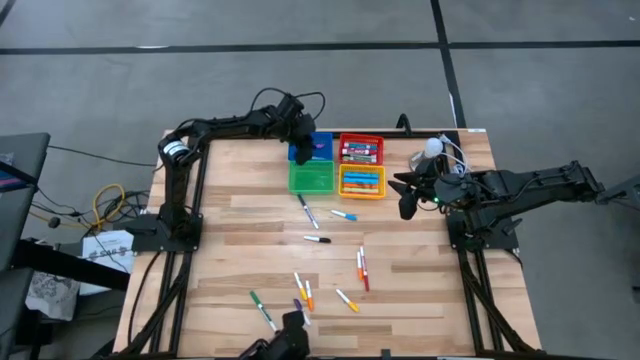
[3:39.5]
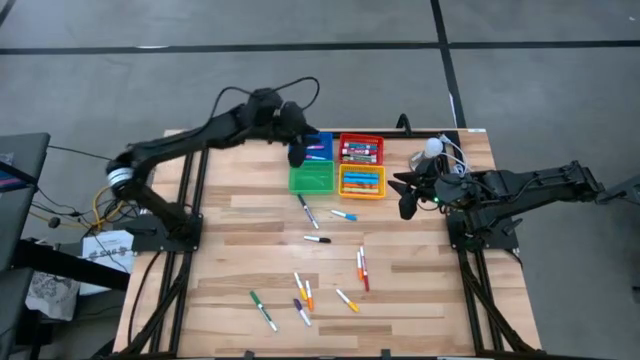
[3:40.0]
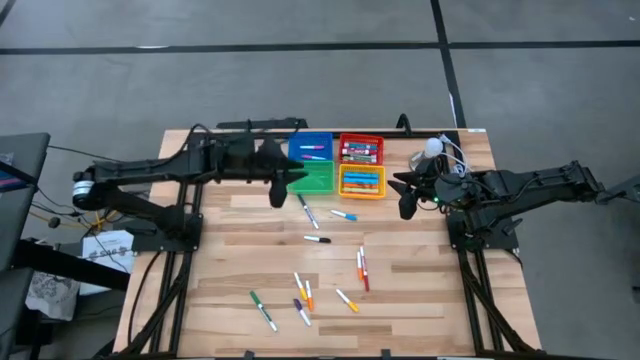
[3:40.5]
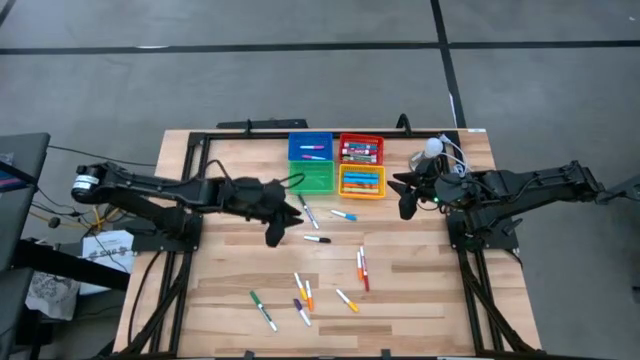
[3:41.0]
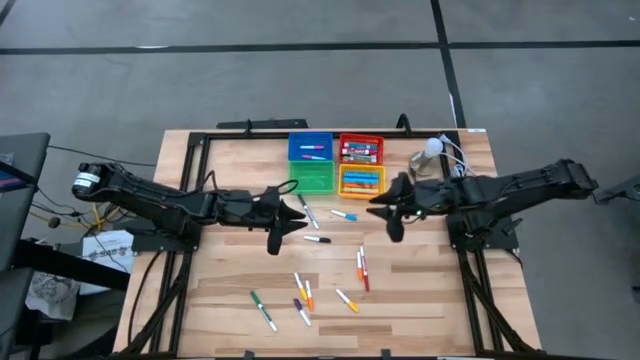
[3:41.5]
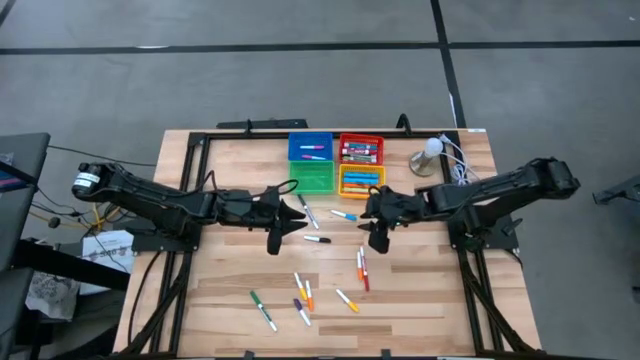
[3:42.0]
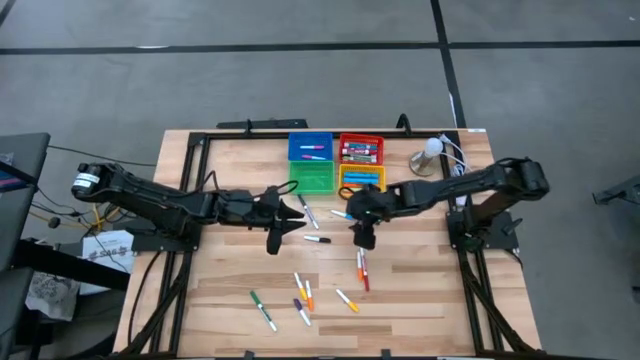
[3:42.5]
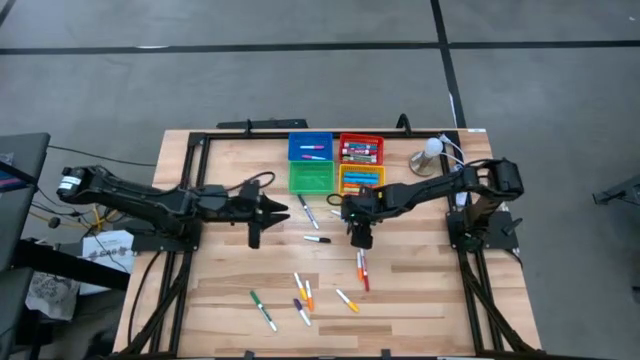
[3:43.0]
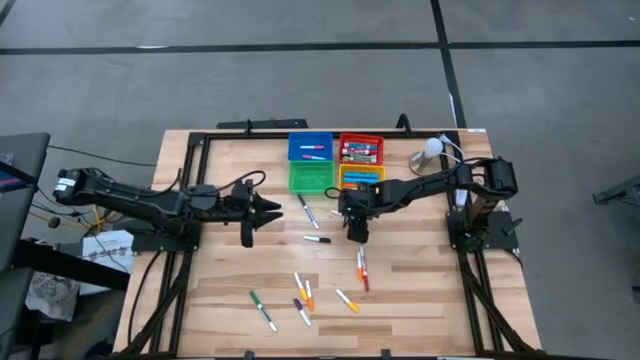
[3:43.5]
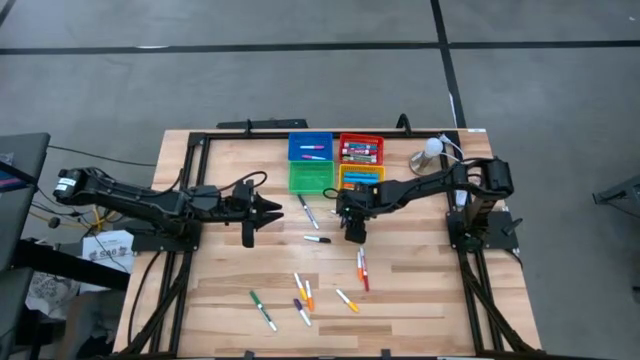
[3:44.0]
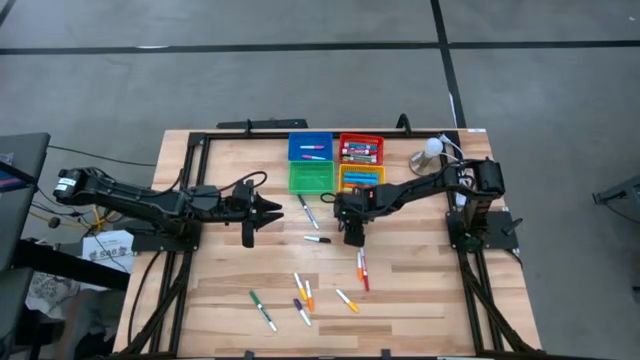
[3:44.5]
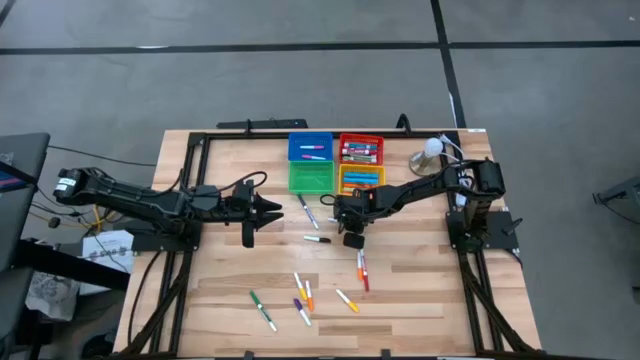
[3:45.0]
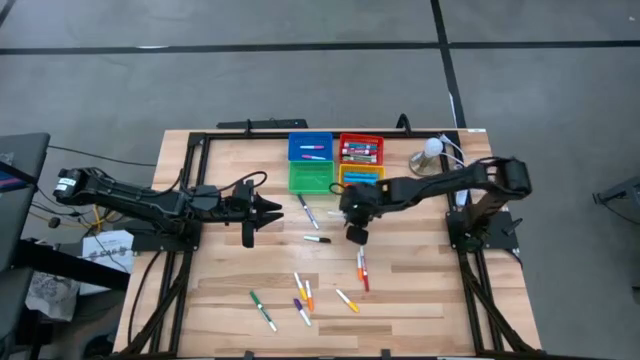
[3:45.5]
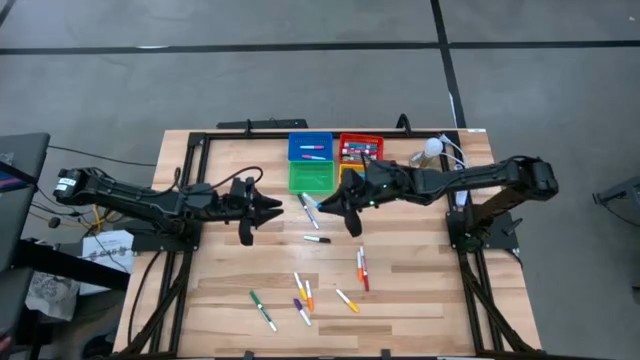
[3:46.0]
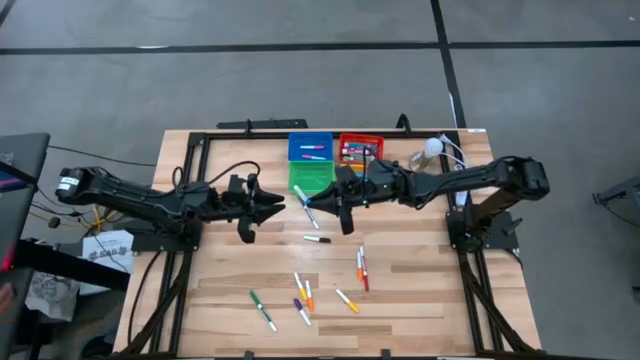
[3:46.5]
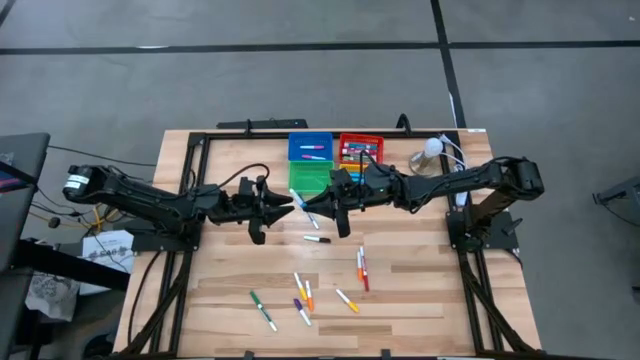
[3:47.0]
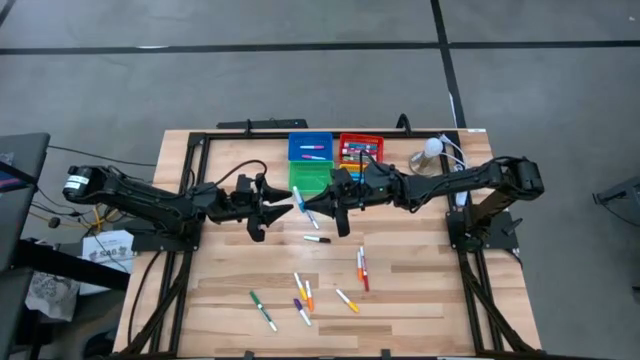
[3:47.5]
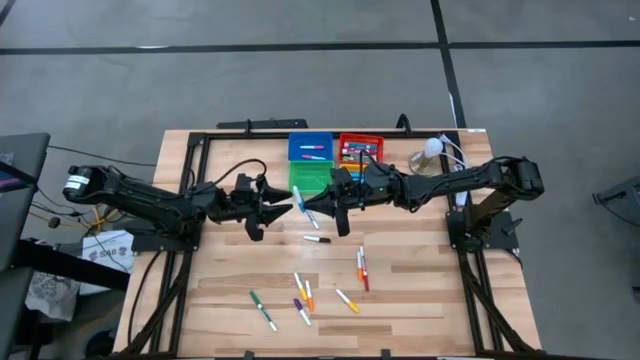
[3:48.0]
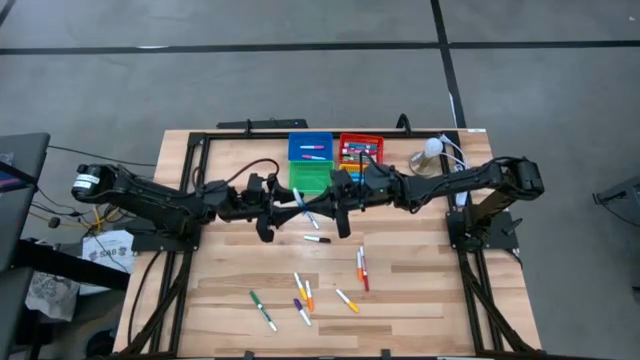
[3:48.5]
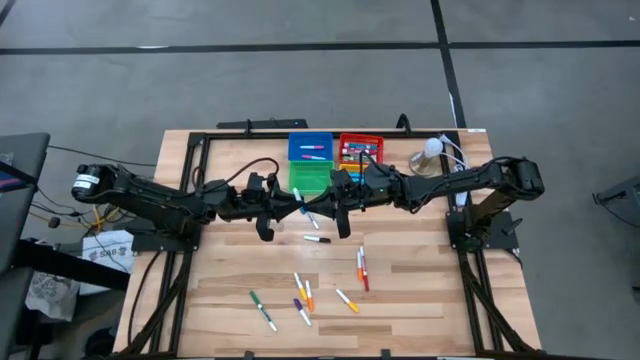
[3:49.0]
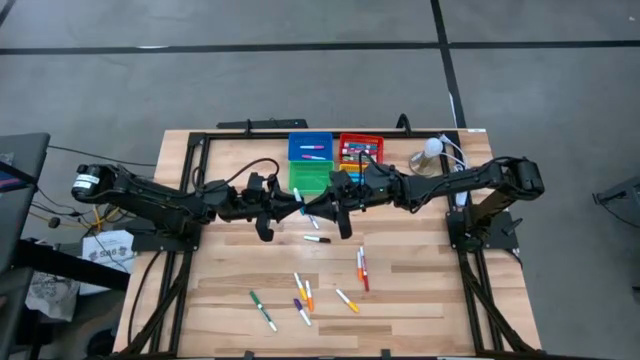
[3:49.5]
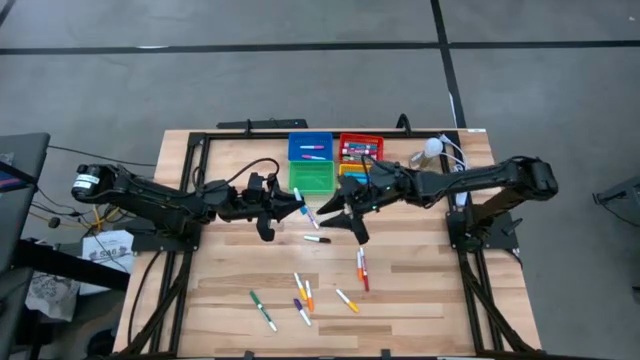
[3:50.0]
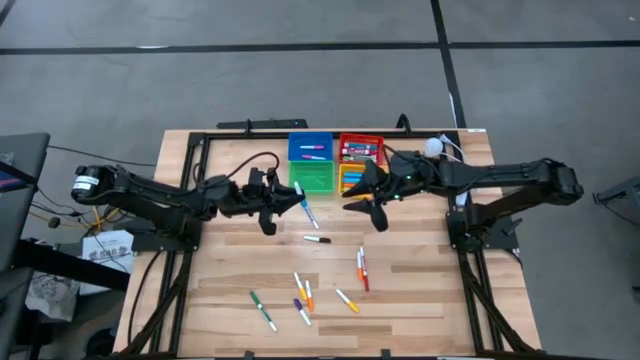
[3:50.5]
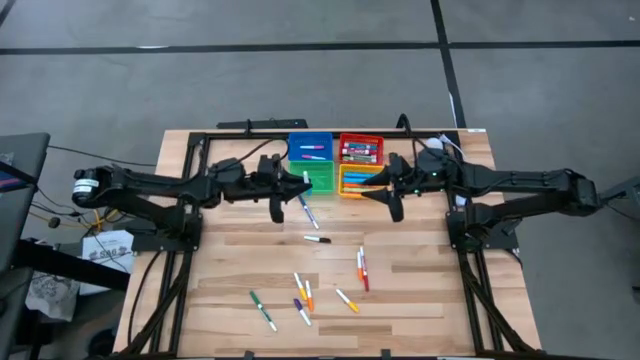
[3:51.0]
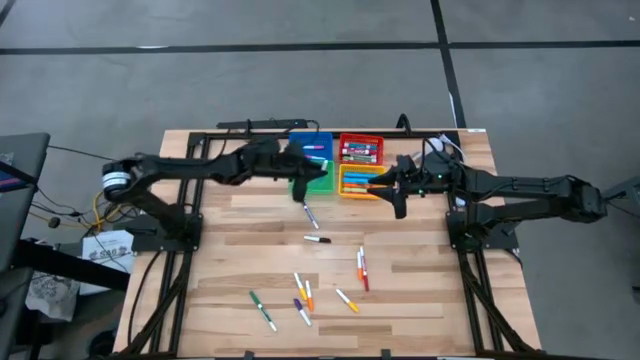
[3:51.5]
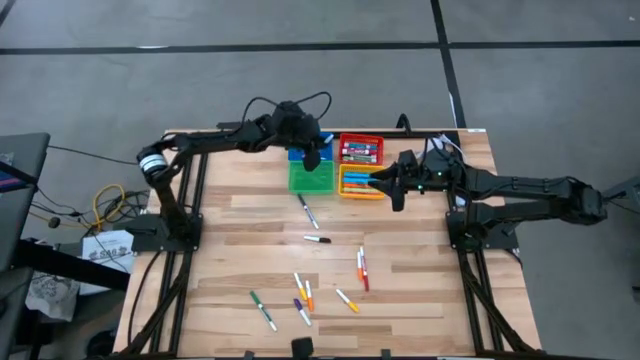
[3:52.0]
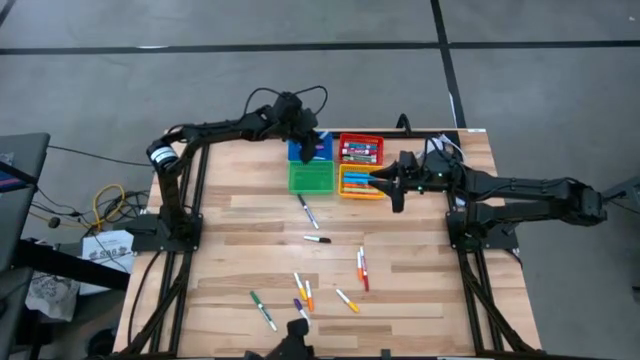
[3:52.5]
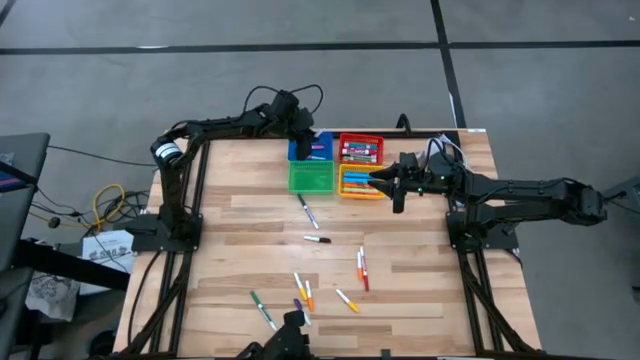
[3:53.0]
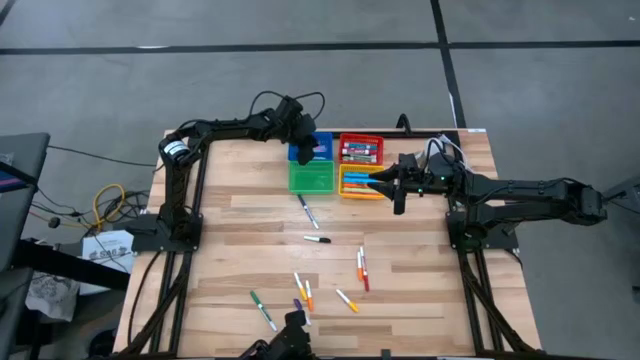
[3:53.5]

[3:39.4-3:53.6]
Task: Pick & Place Markers
Put the small blue highlighter pen into the blue bin

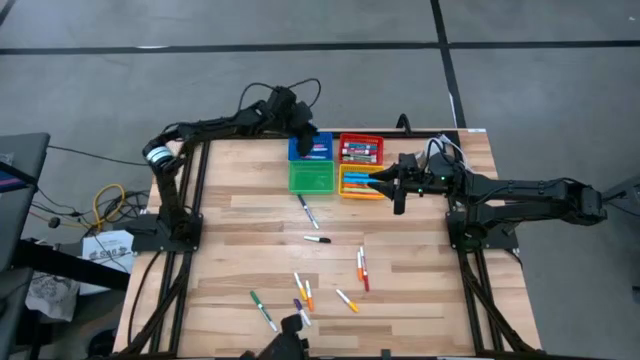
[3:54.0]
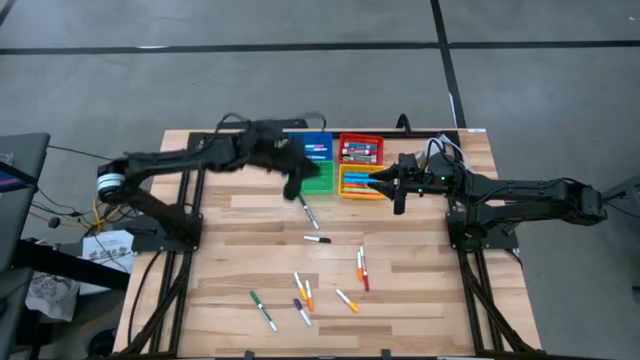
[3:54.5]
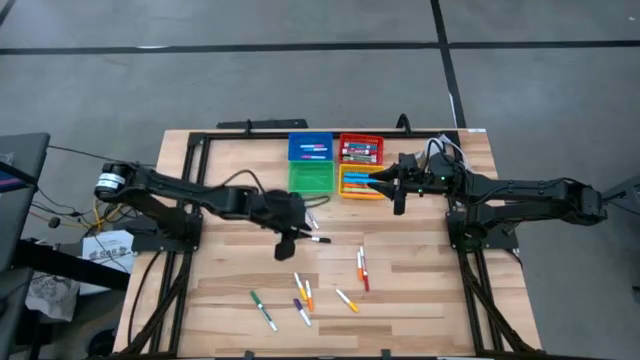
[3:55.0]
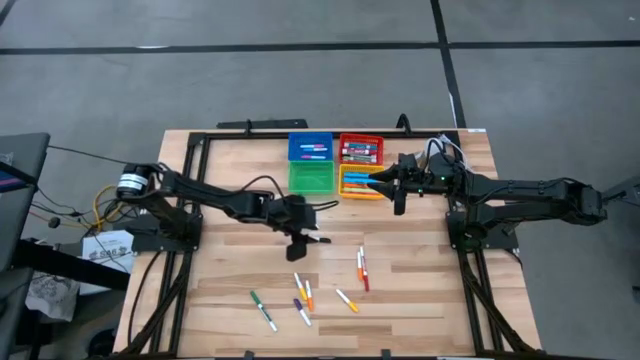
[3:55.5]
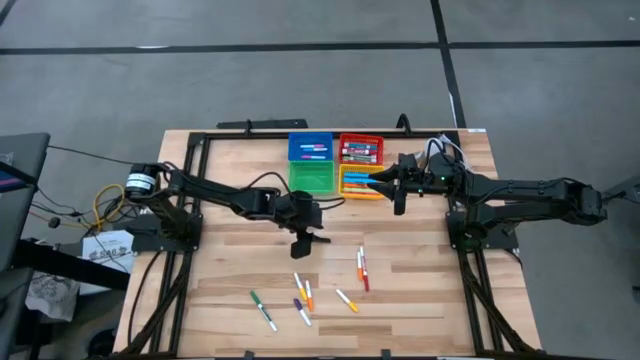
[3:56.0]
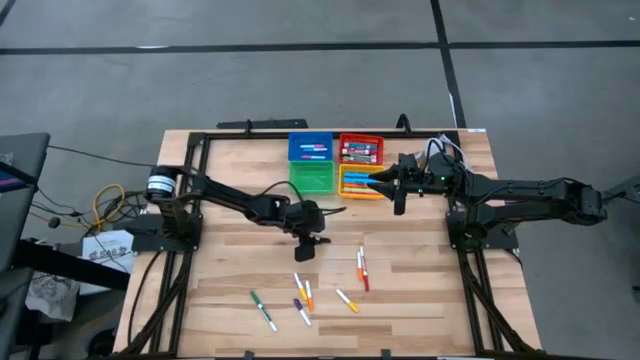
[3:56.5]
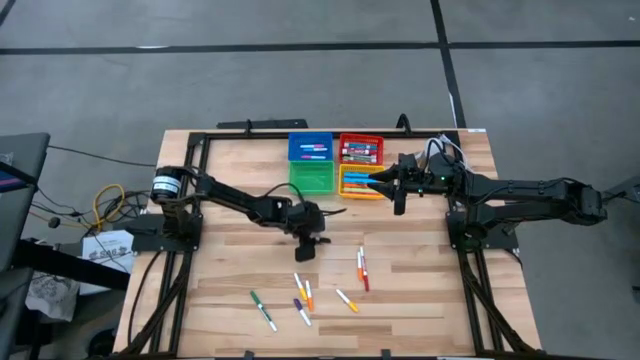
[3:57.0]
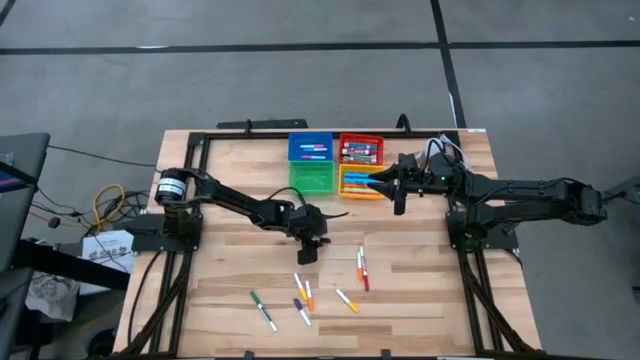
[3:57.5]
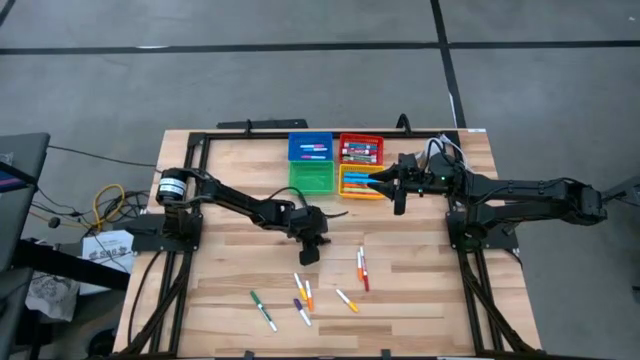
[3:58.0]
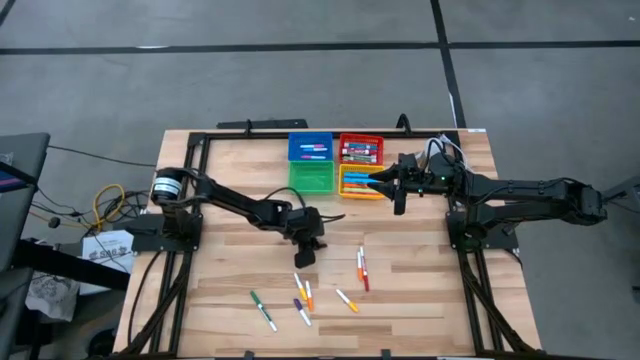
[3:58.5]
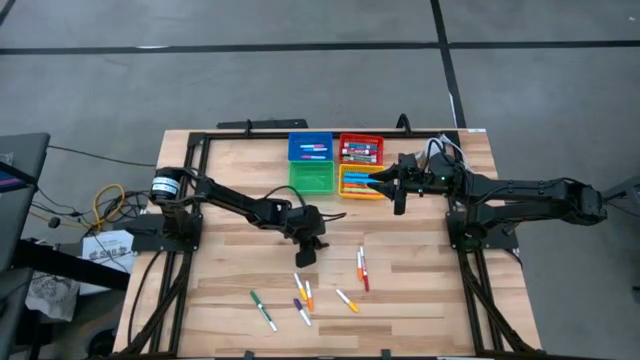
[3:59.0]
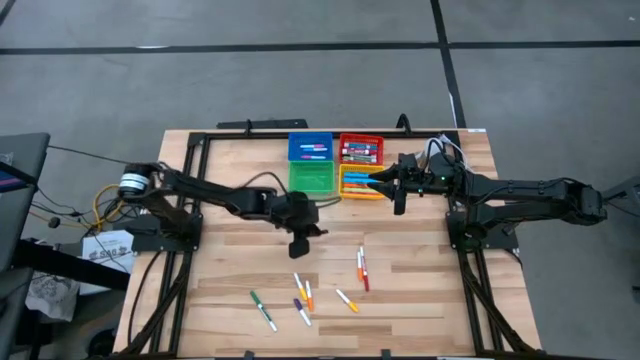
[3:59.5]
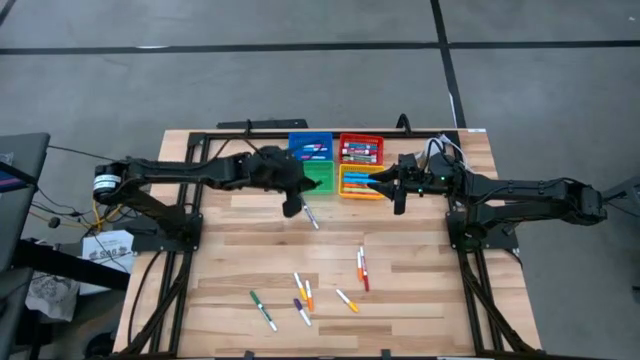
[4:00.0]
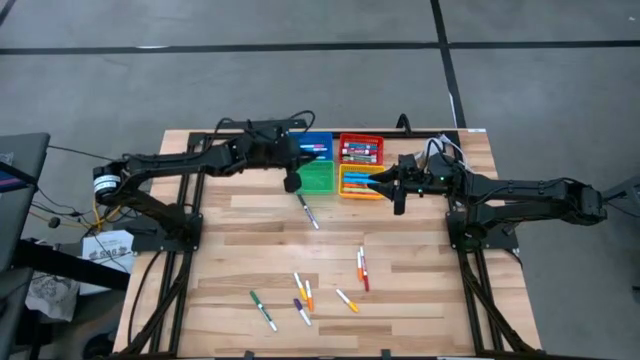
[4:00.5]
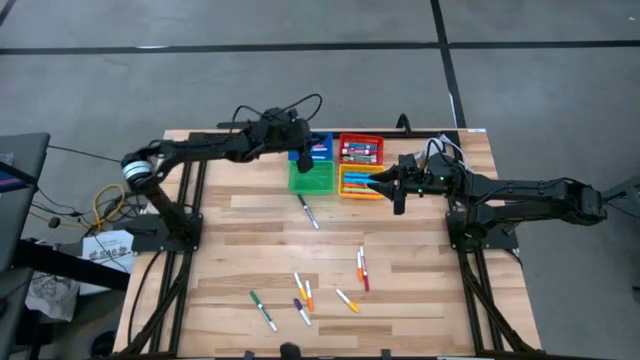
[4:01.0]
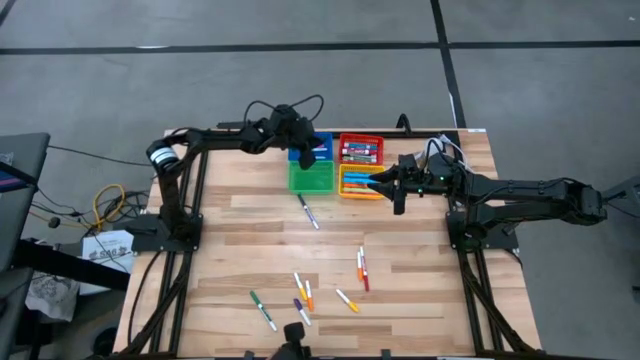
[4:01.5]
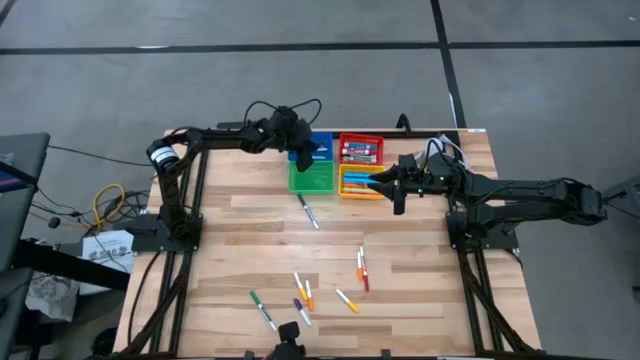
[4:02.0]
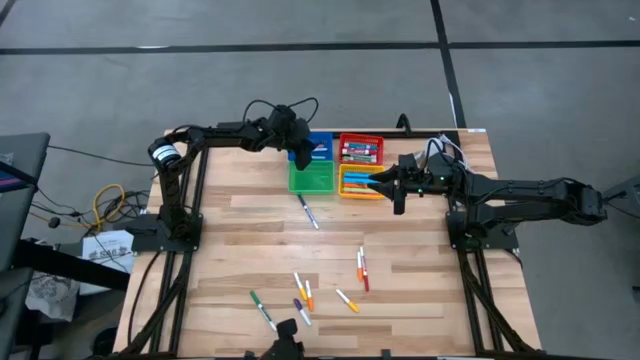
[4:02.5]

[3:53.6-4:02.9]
Put the black highlighter pen into the blue bin
